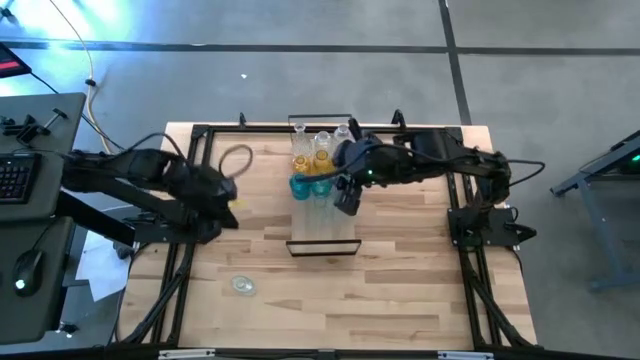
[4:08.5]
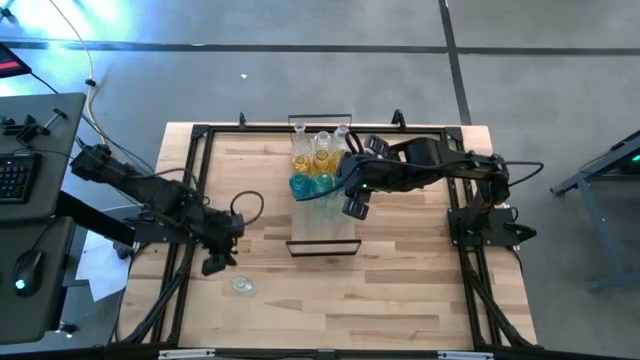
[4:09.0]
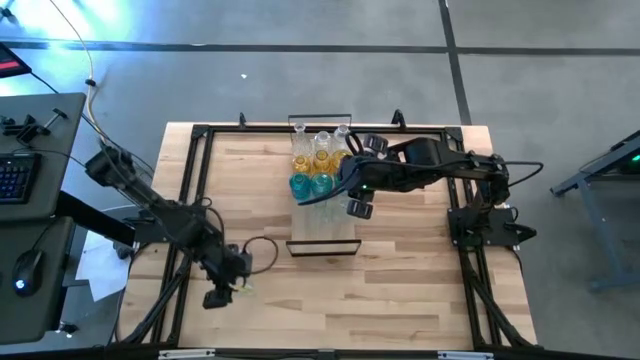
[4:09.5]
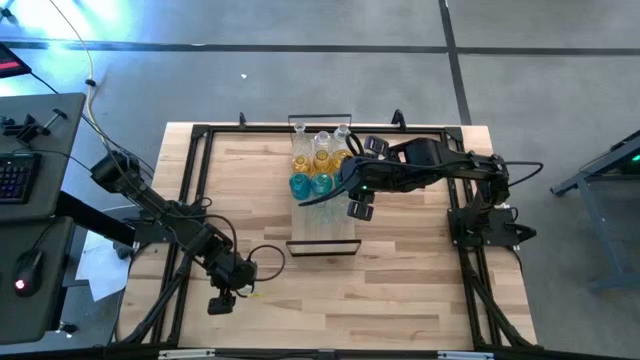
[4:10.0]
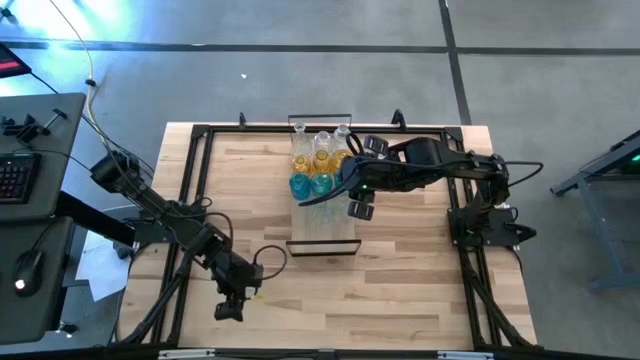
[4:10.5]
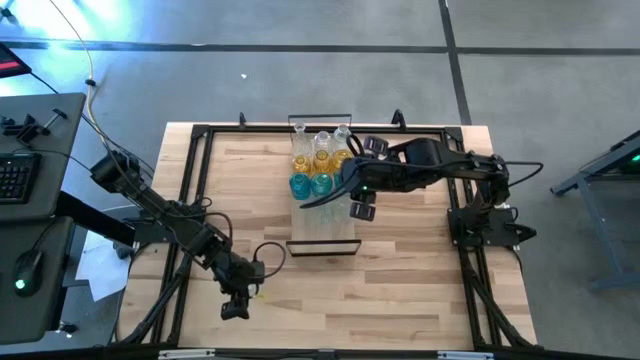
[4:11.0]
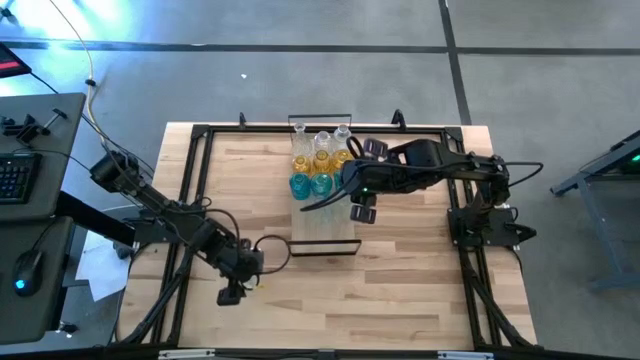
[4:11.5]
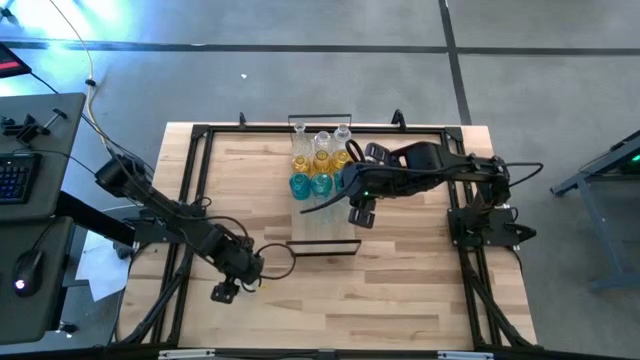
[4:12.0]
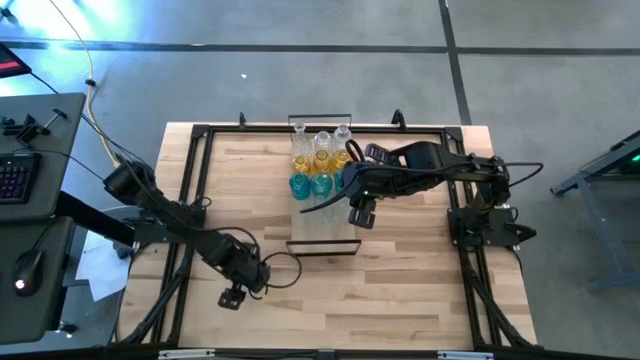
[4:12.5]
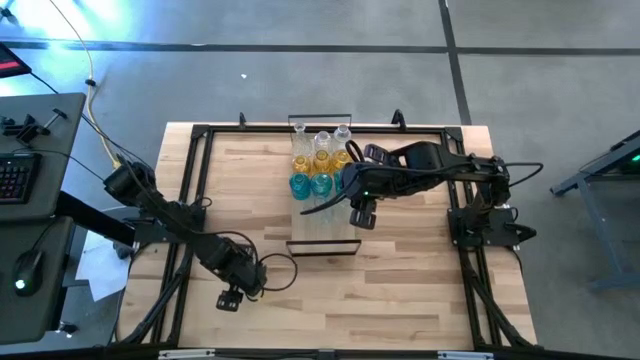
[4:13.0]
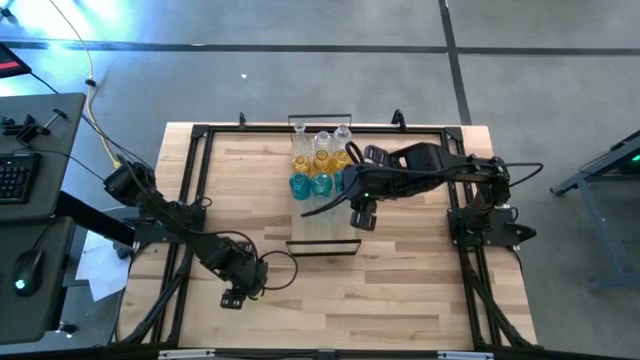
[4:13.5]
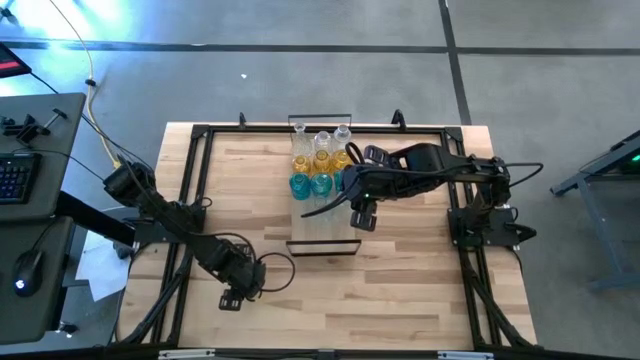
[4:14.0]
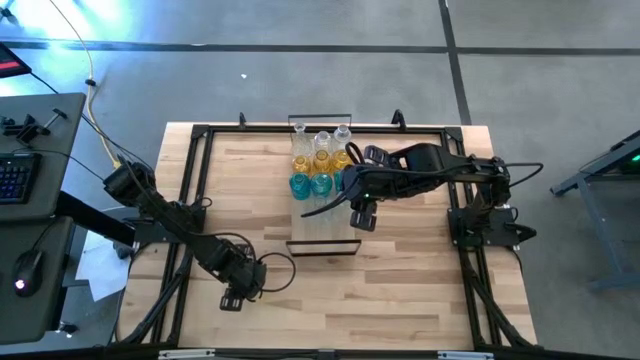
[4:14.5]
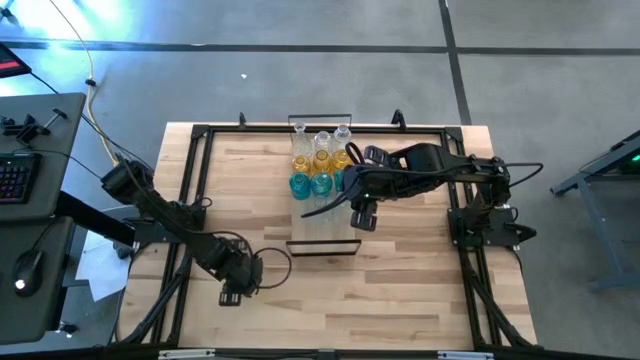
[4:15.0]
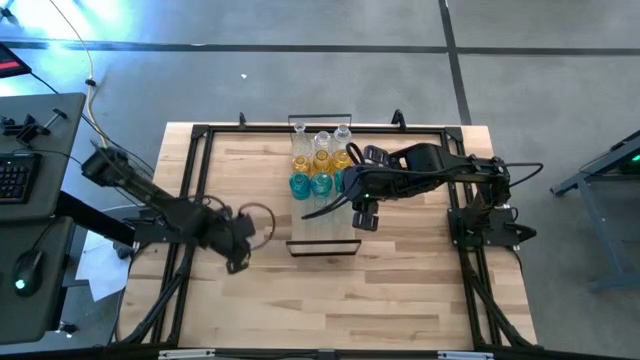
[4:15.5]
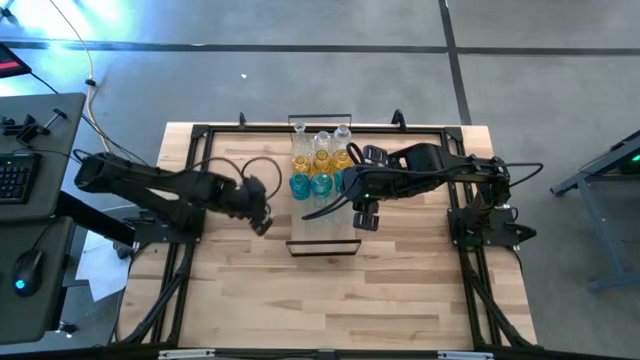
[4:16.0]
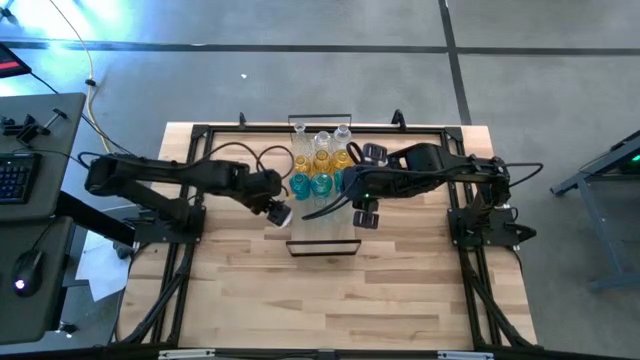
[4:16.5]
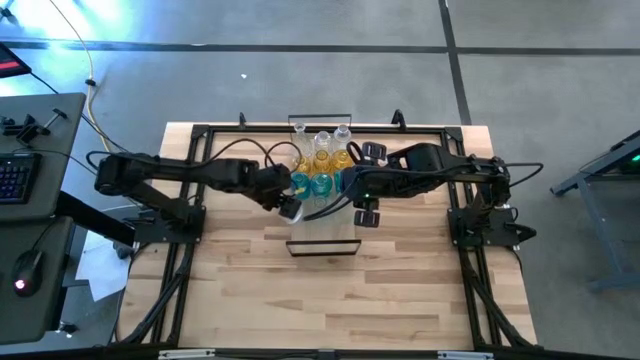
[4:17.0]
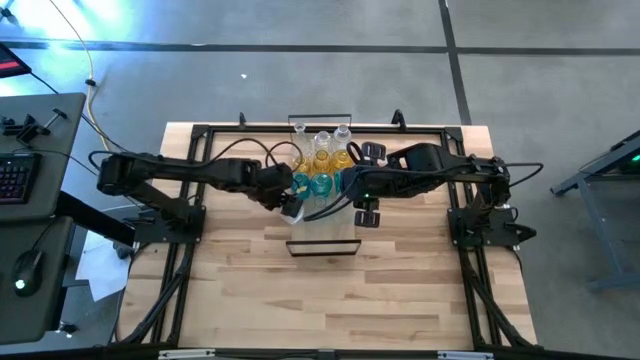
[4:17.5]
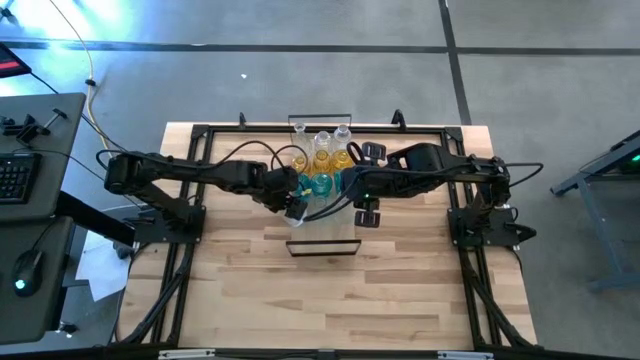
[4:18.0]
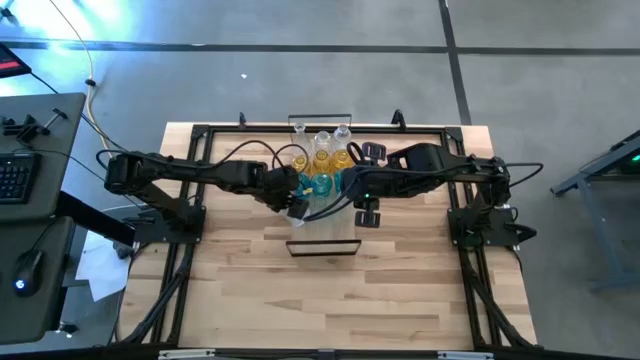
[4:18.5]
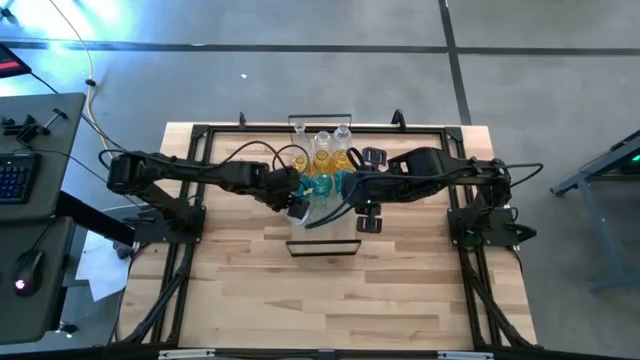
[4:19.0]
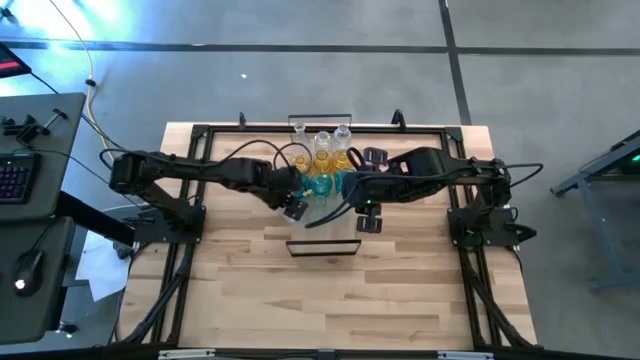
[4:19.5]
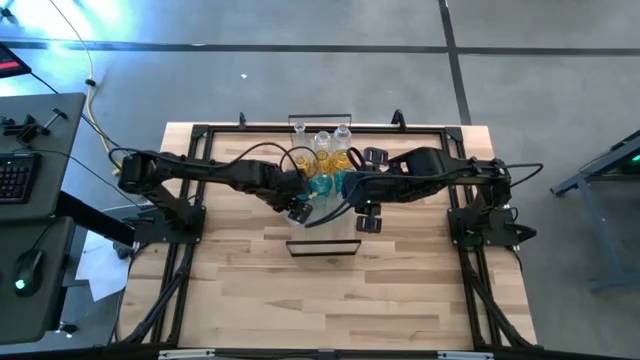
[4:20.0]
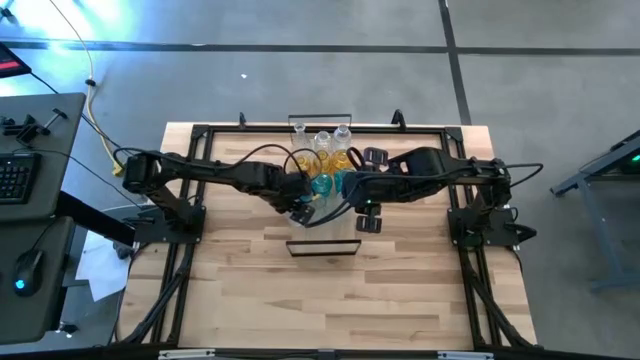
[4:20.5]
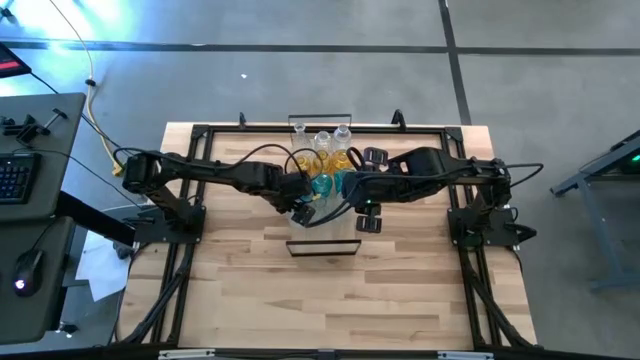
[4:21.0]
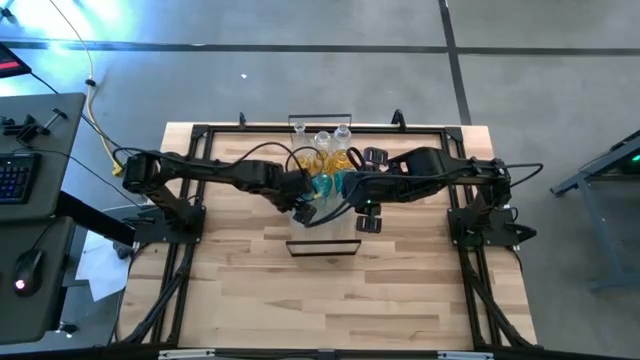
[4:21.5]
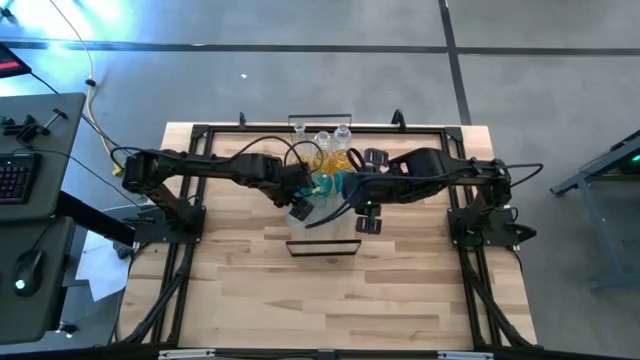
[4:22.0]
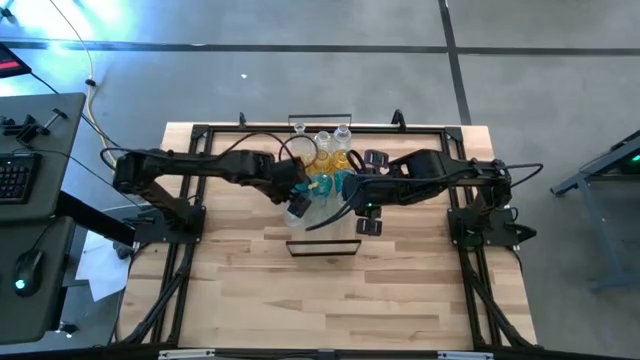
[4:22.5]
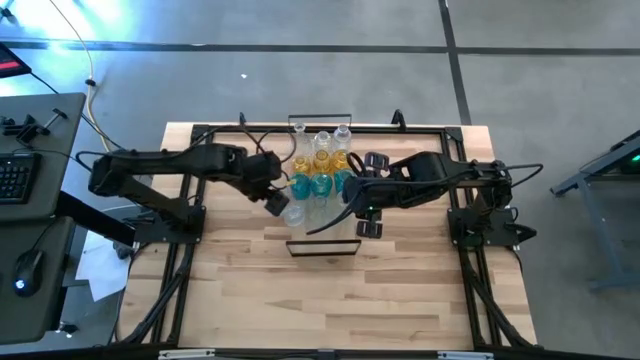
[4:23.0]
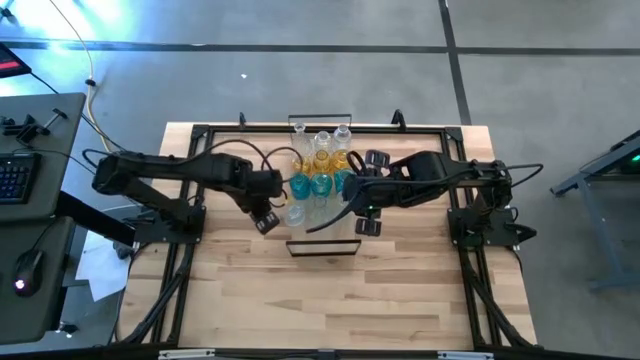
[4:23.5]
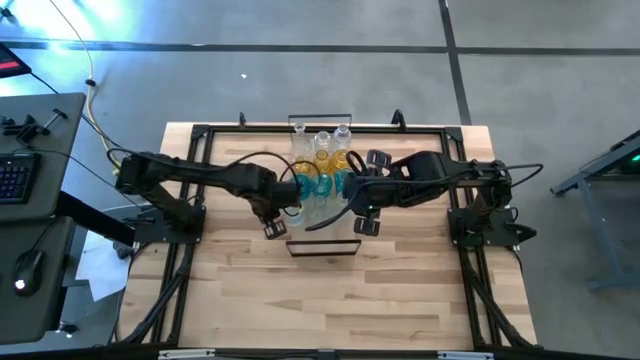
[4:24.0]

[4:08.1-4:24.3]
Task: sort vases onto shelf
Put the transparent flower vase on the shelf aligned with the other transparent flower vase

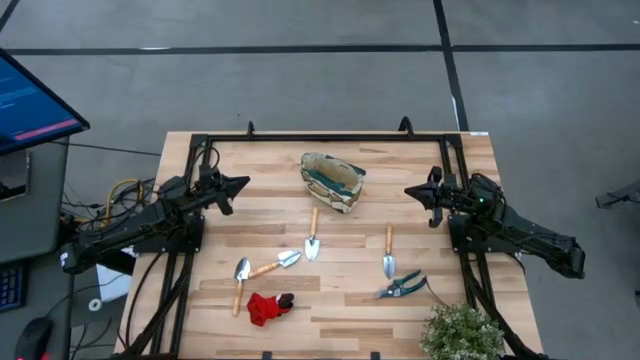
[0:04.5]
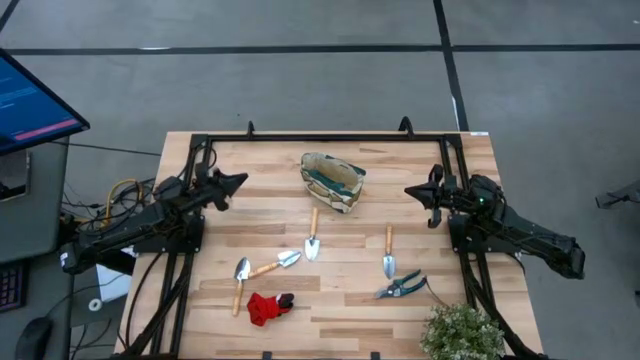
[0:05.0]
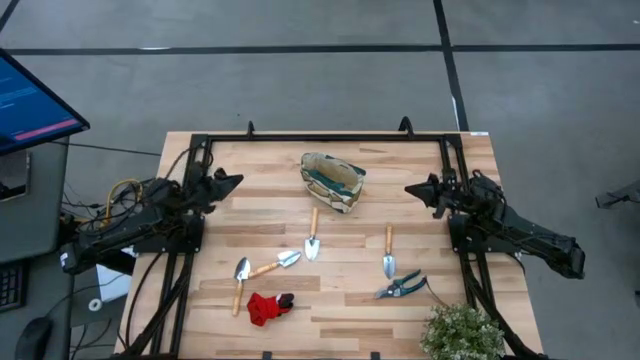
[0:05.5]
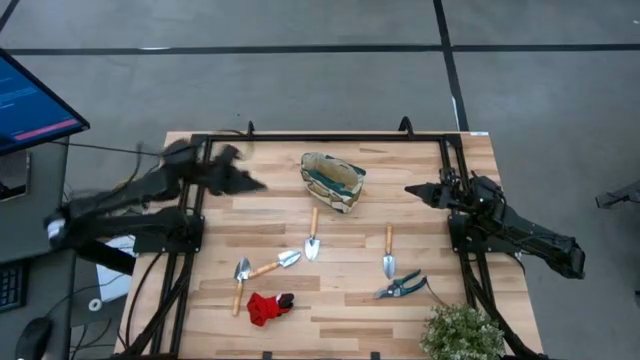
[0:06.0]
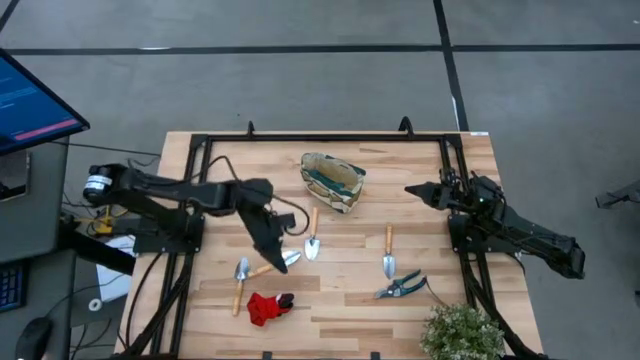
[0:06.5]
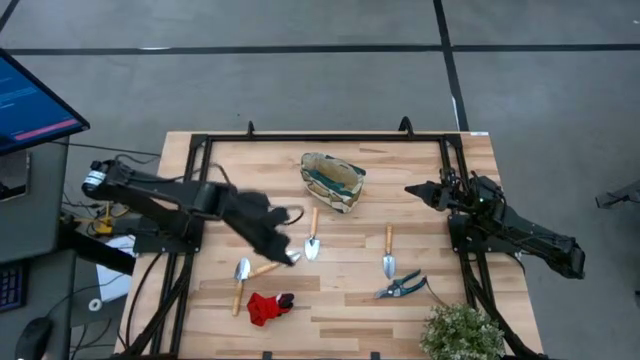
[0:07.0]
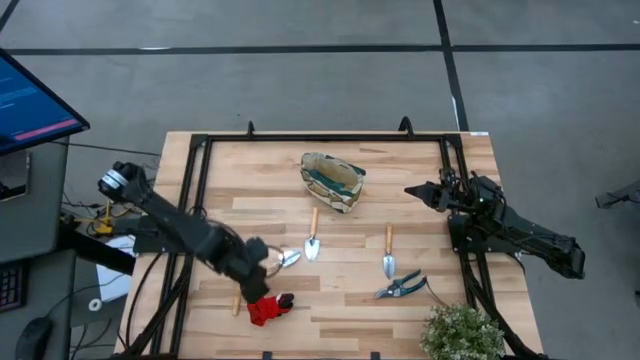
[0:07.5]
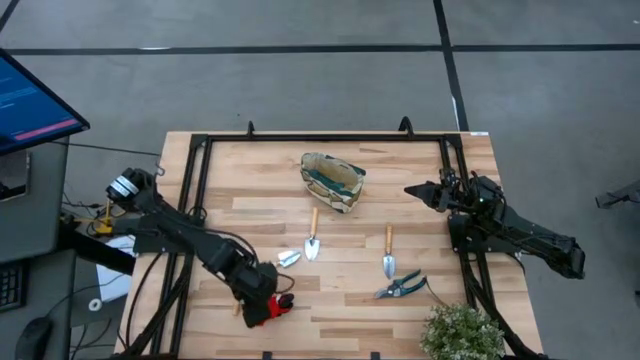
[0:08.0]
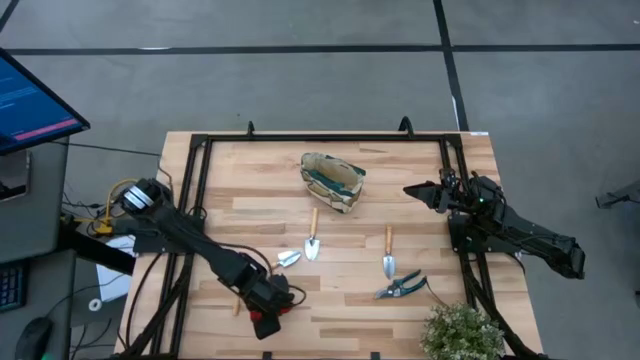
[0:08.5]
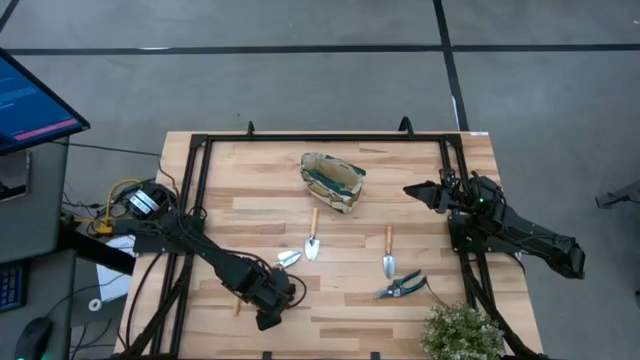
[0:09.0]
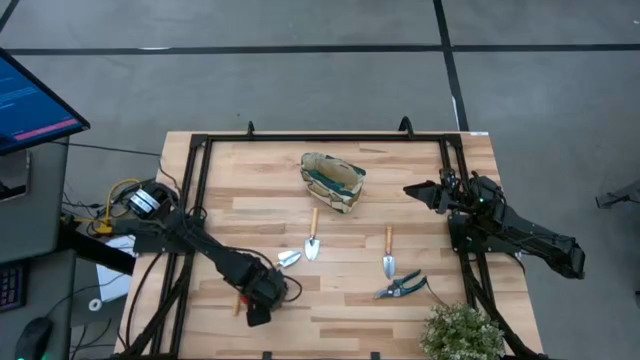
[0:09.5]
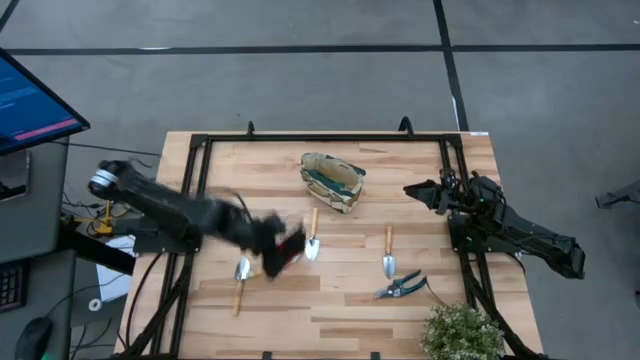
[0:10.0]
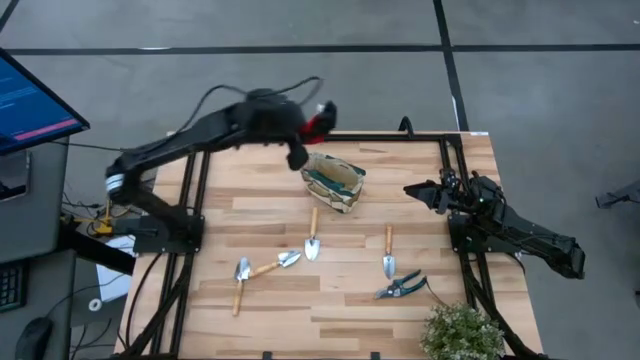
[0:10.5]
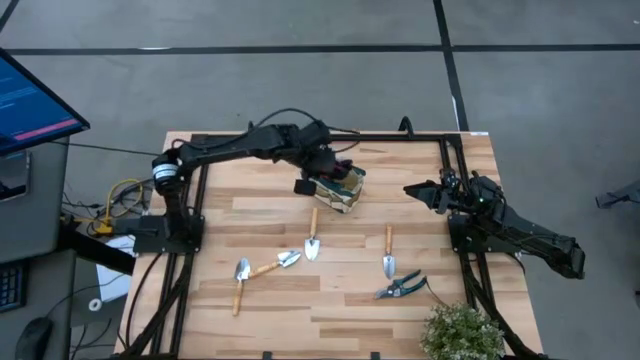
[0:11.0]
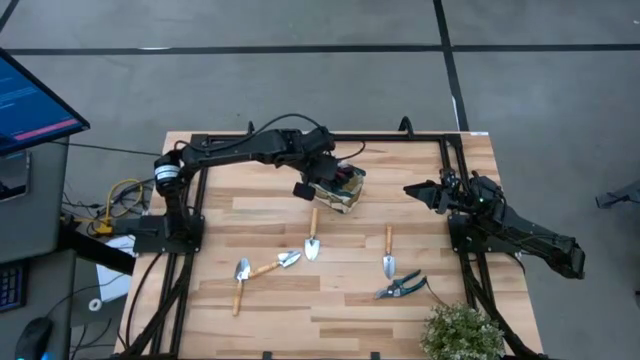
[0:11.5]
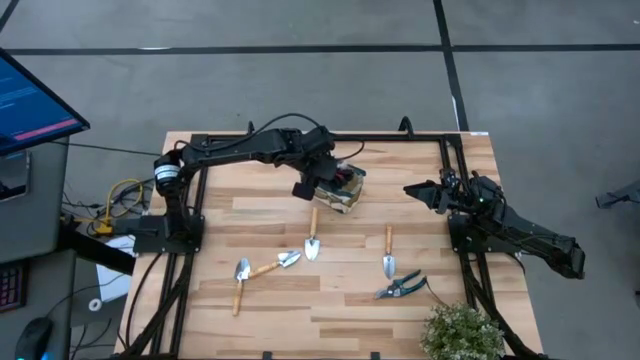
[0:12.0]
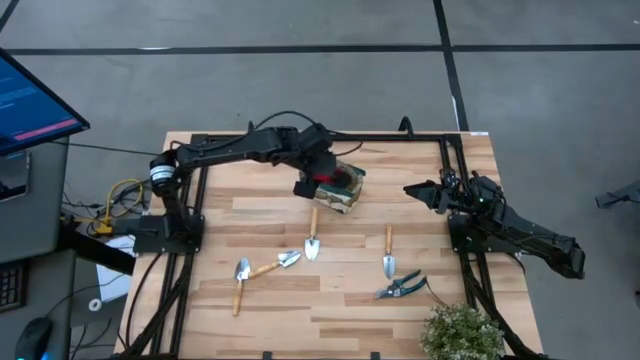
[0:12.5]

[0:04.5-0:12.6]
Task: Pick & Place Garden tools in Gardening bag
Put the red gloves into the gardening bag
